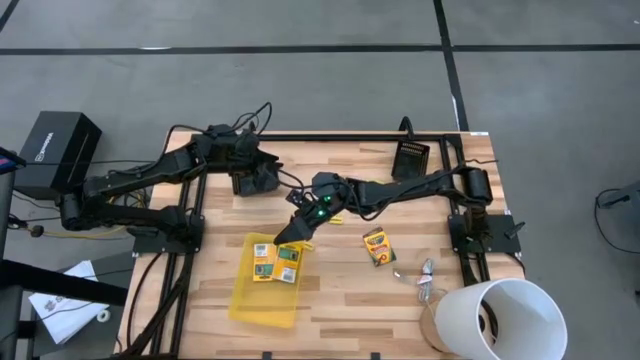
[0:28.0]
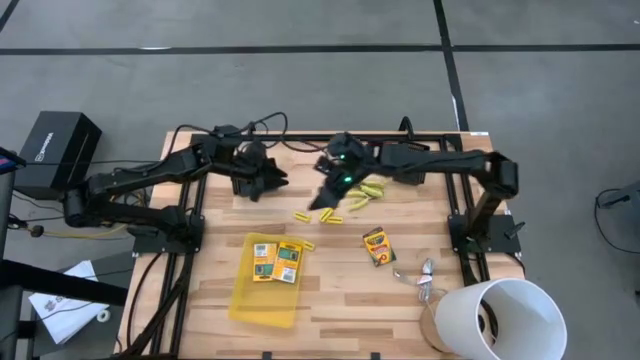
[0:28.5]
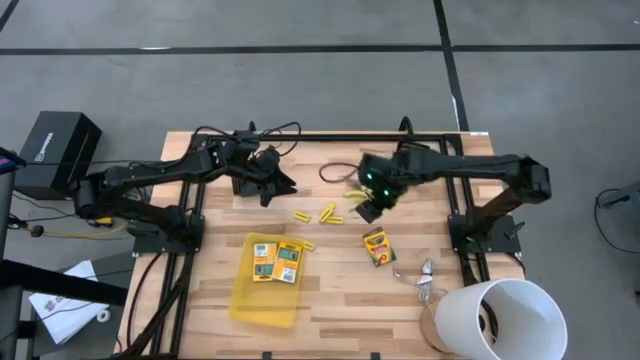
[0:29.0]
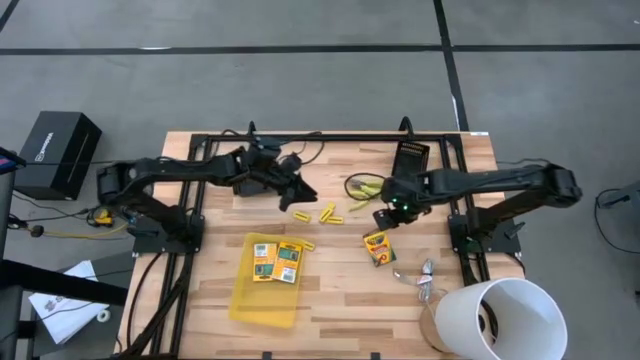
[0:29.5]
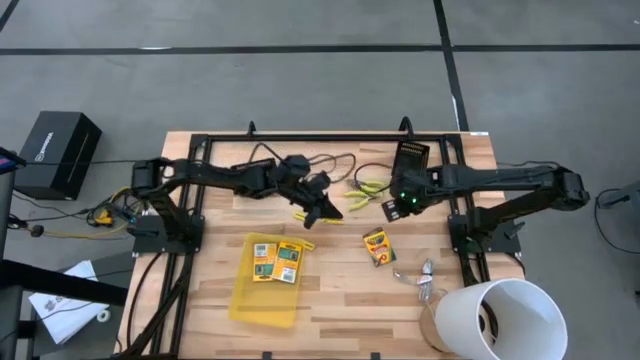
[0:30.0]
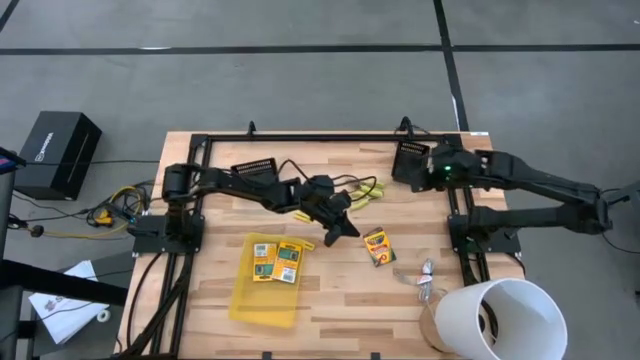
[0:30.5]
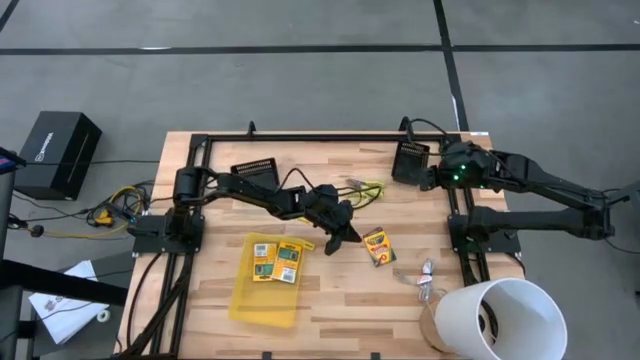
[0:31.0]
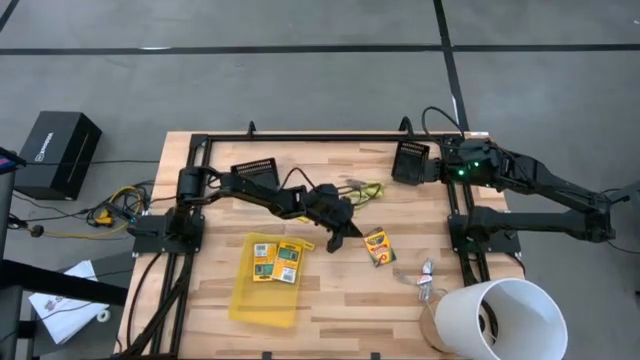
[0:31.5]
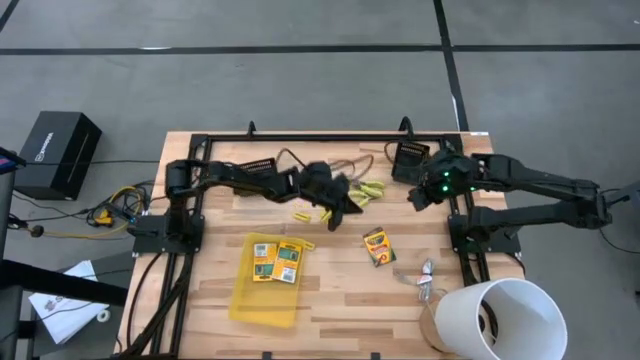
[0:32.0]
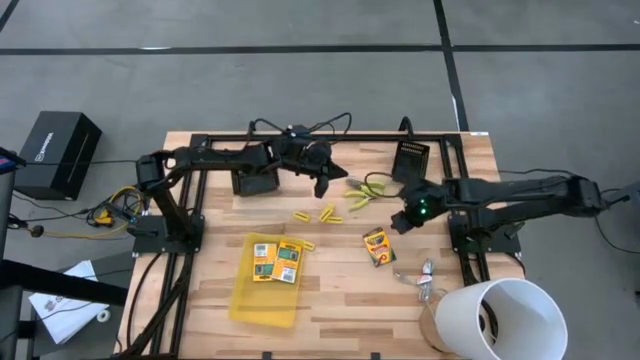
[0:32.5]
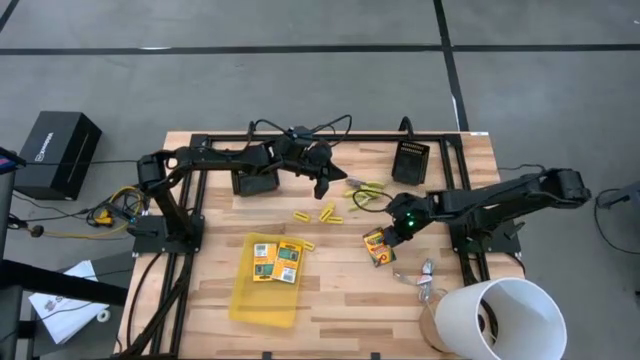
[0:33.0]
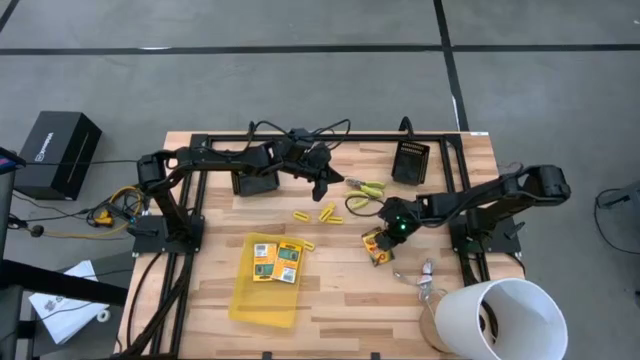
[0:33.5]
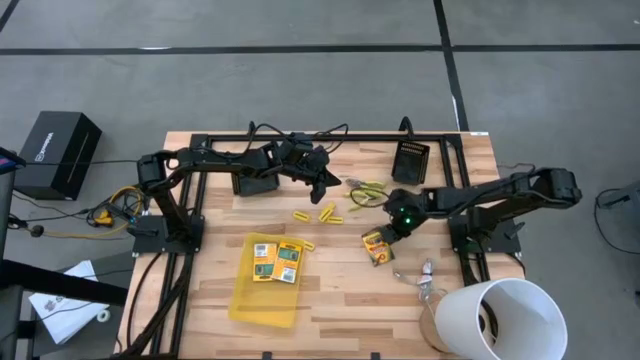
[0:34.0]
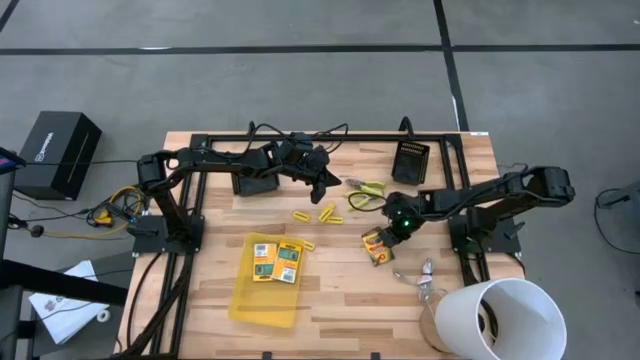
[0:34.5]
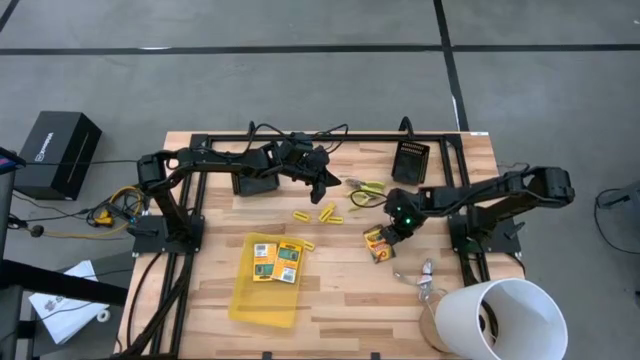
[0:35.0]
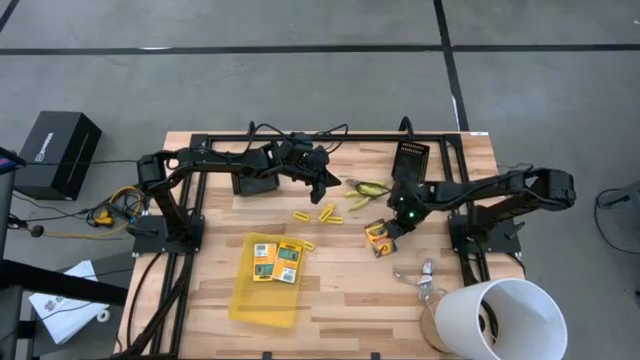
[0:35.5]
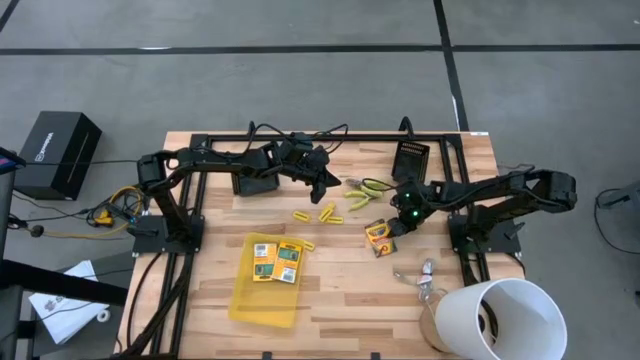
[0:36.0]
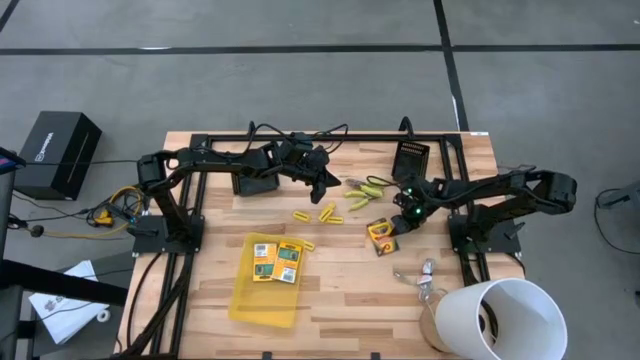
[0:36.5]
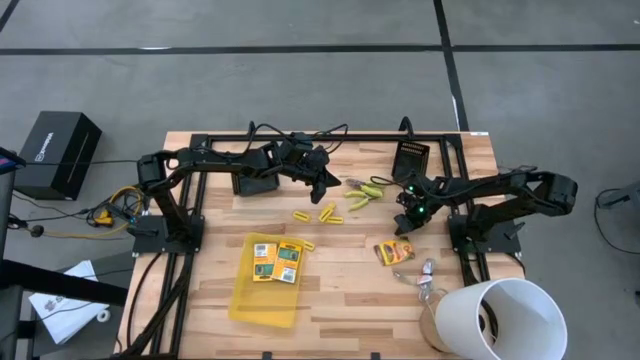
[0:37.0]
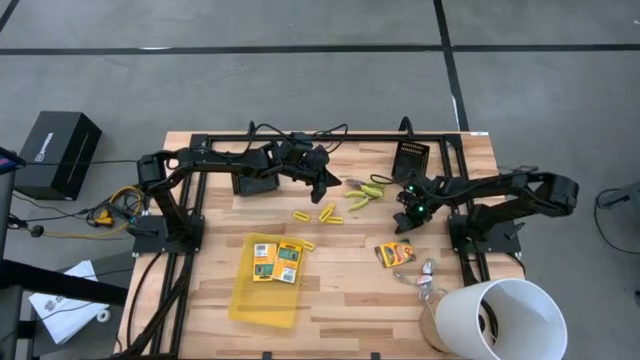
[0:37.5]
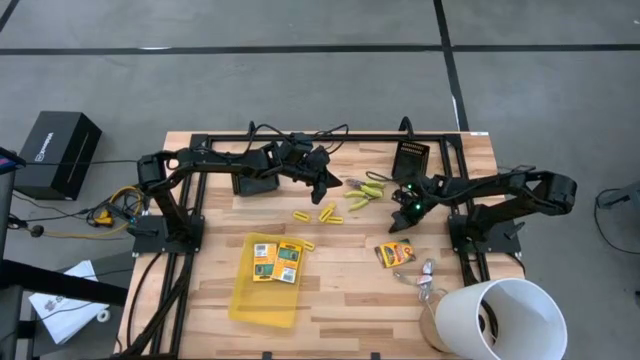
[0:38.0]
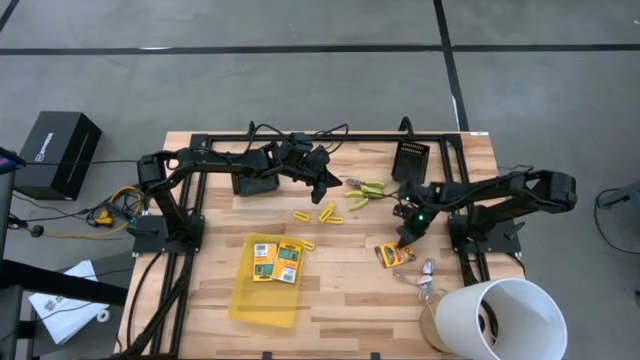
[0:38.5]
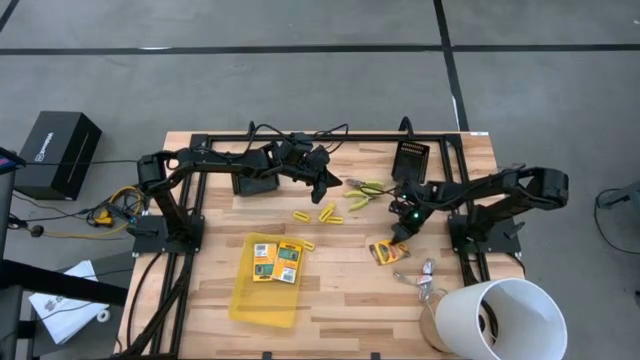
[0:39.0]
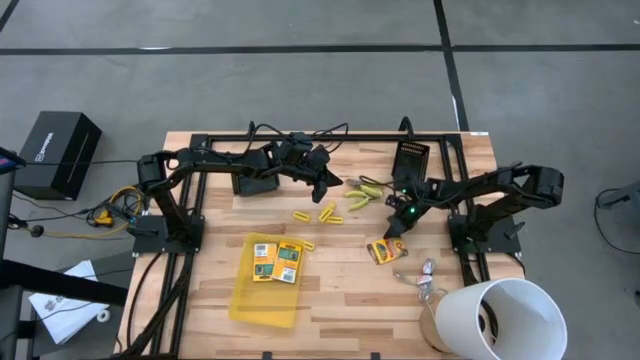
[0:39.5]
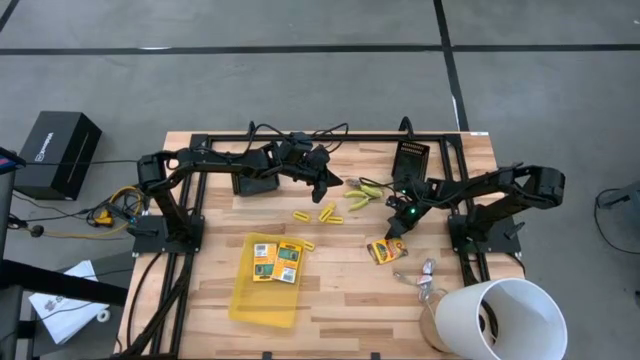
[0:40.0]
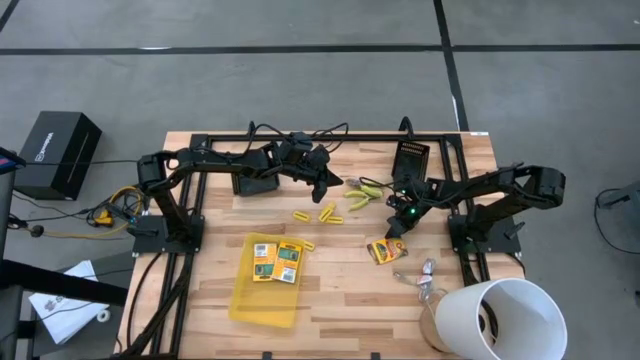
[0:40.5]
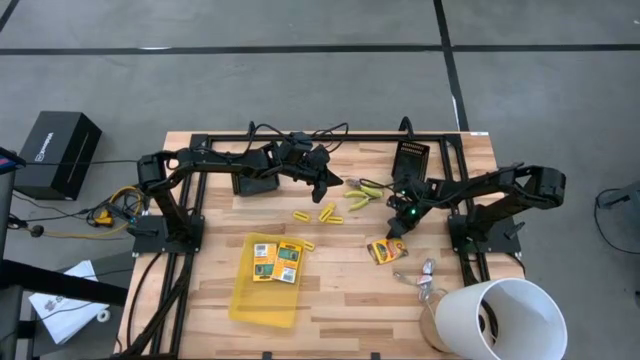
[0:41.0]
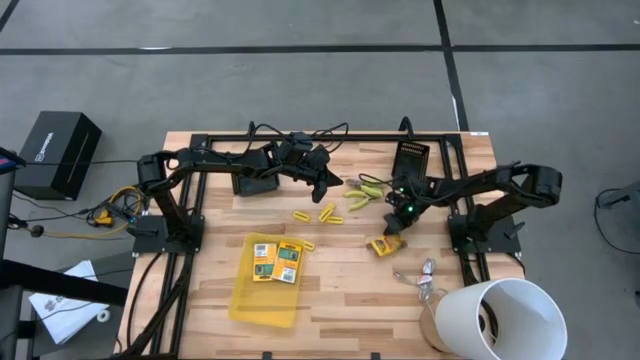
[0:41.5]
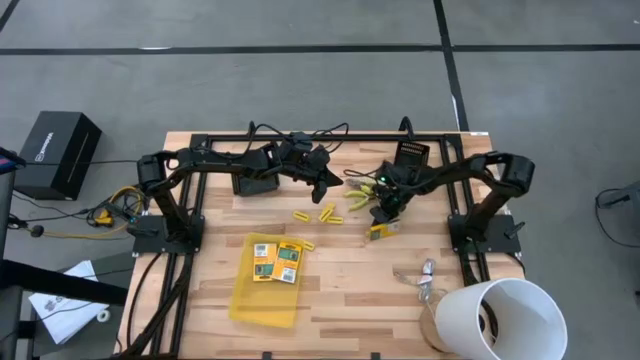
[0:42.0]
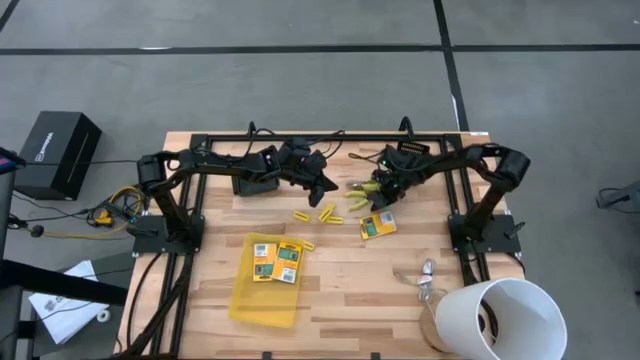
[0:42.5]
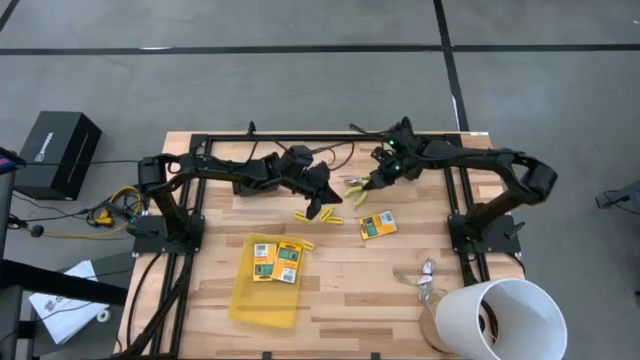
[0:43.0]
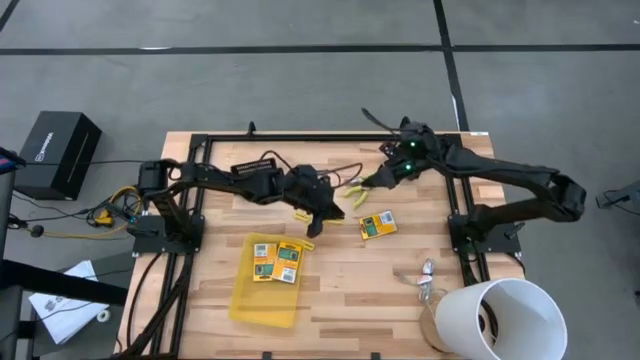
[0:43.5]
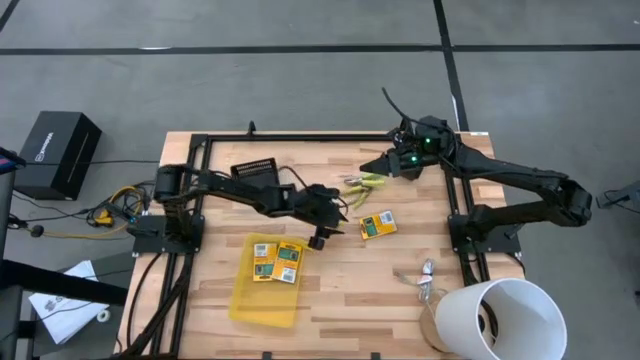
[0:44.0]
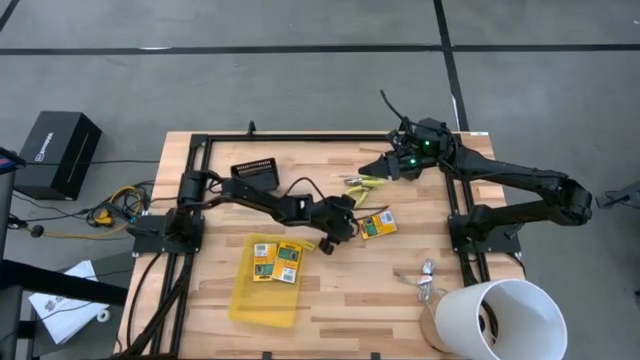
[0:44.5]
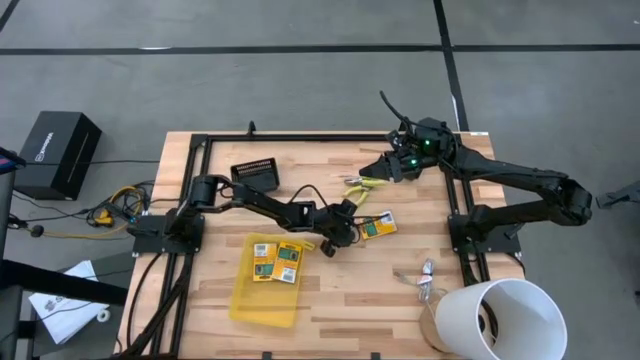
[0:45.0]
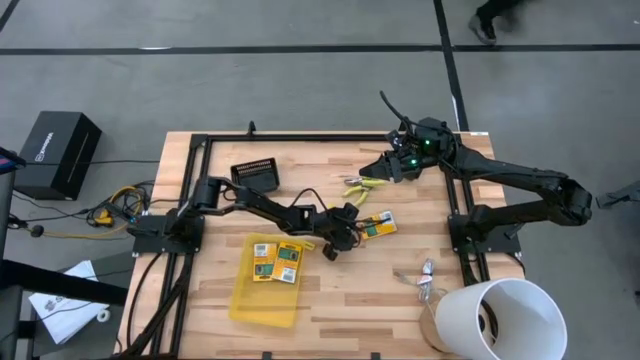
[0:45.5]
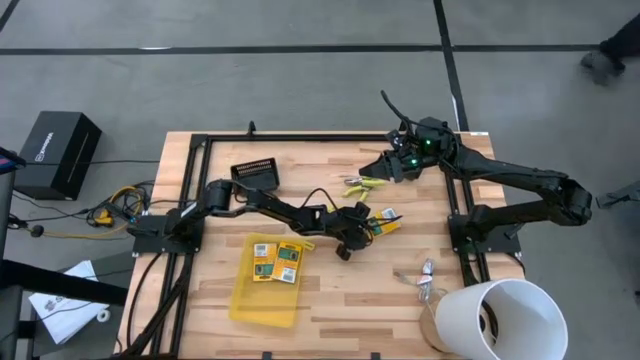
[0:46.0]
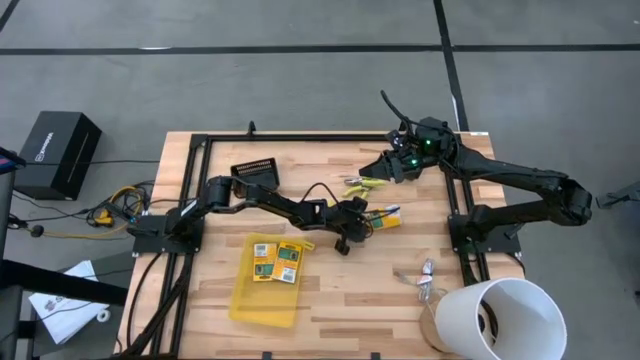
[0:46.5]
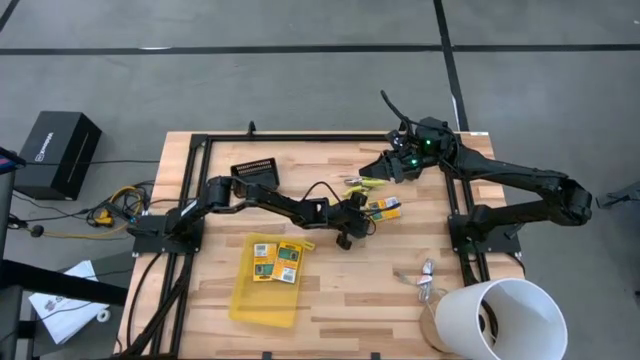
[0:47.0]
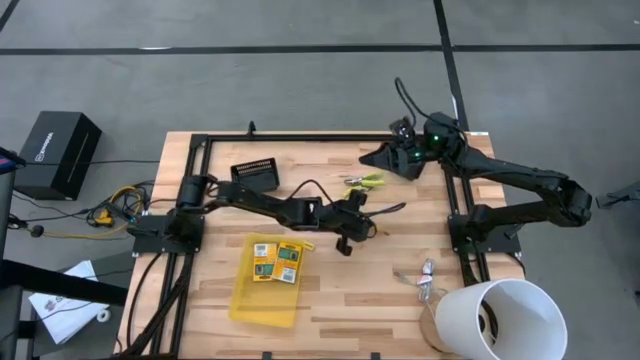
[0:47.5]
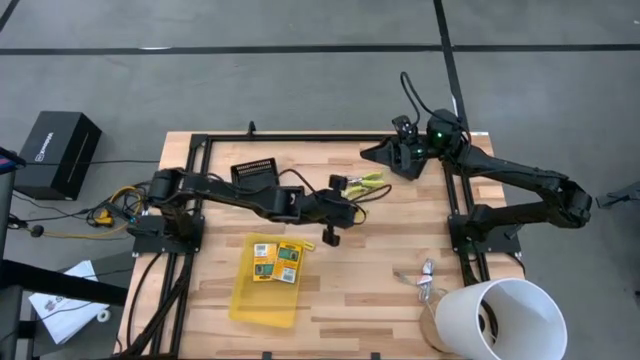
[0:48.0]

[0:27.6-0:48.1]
Task: Pick & Place School Supplies
Put the yellow crayon box into the yellow bin
